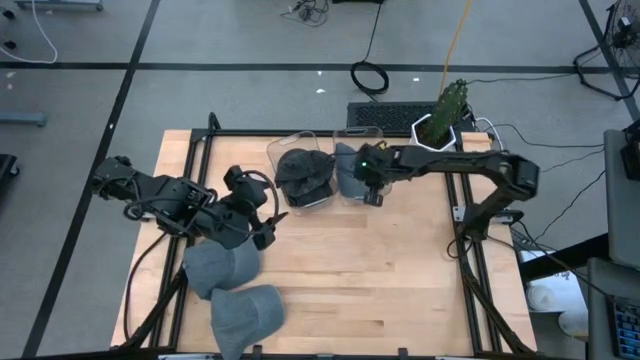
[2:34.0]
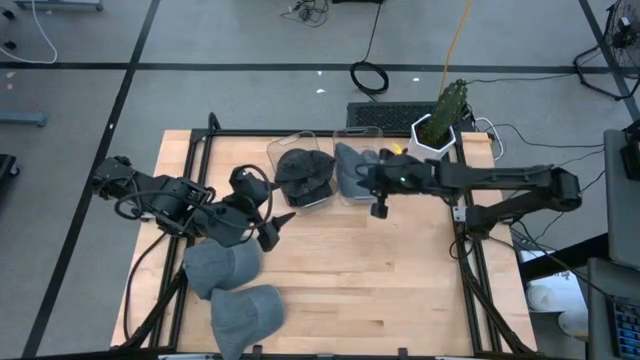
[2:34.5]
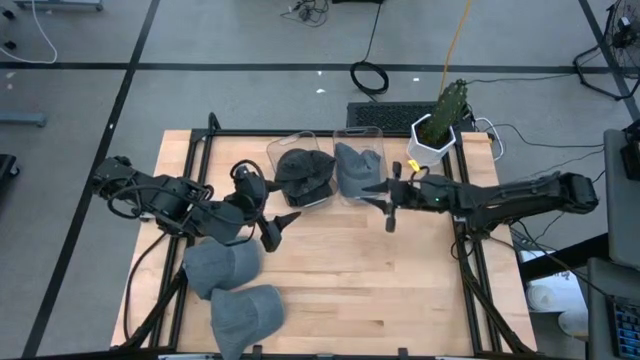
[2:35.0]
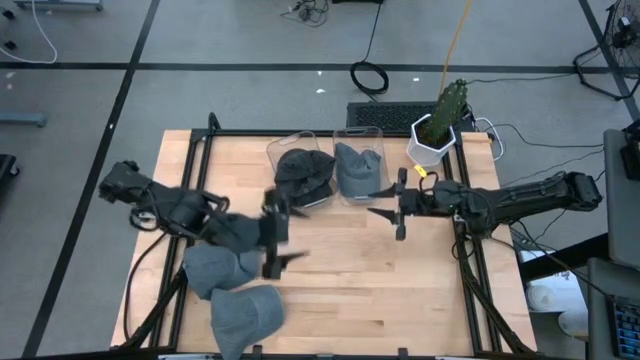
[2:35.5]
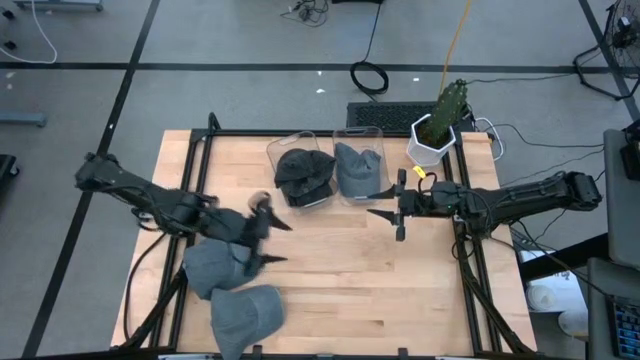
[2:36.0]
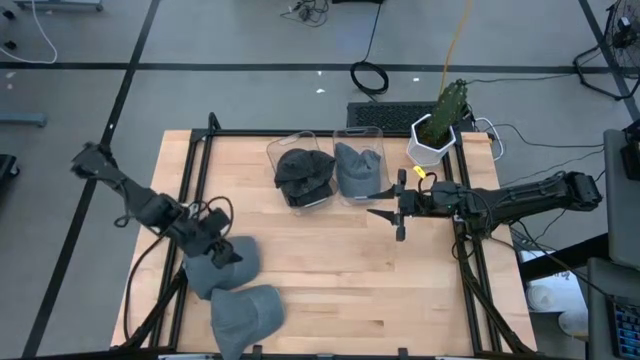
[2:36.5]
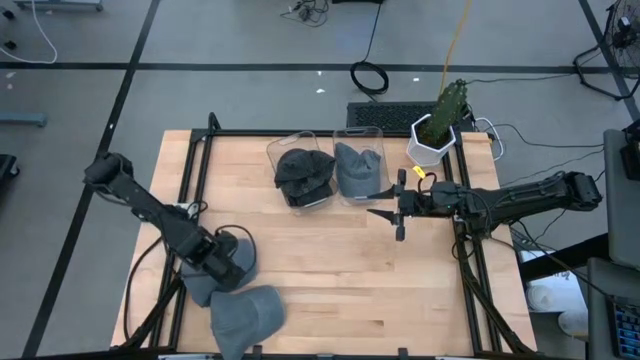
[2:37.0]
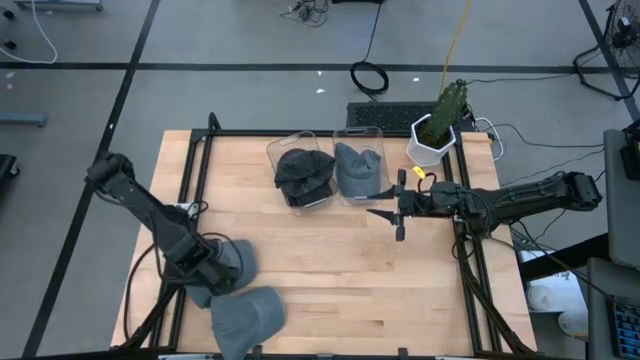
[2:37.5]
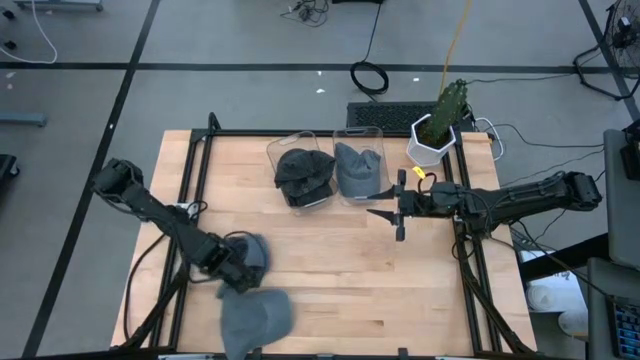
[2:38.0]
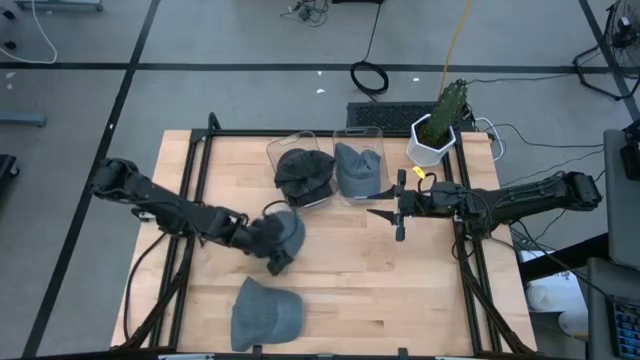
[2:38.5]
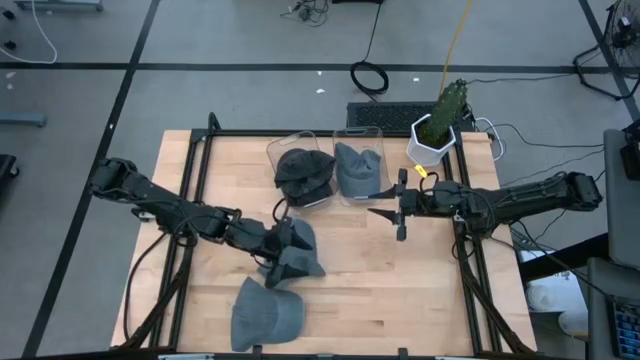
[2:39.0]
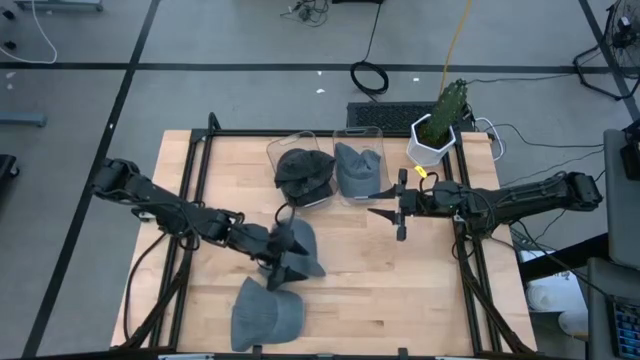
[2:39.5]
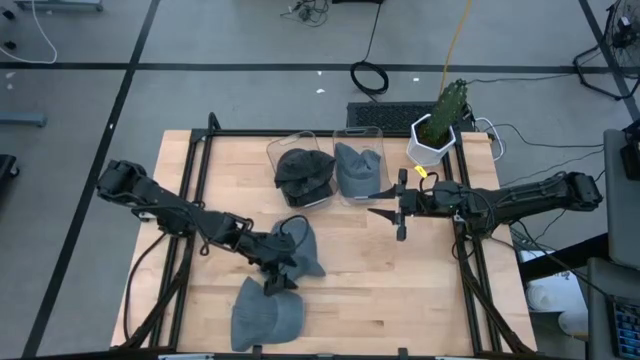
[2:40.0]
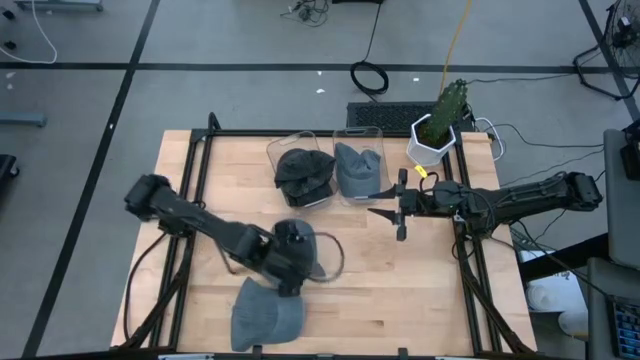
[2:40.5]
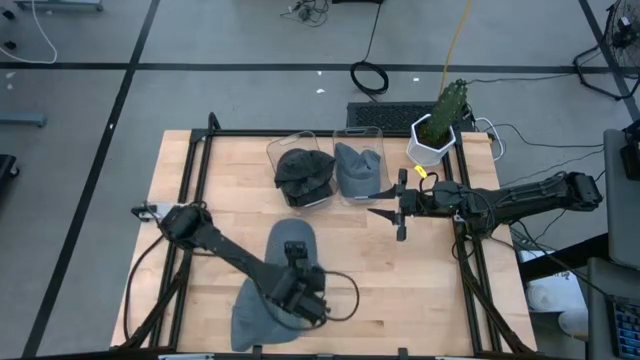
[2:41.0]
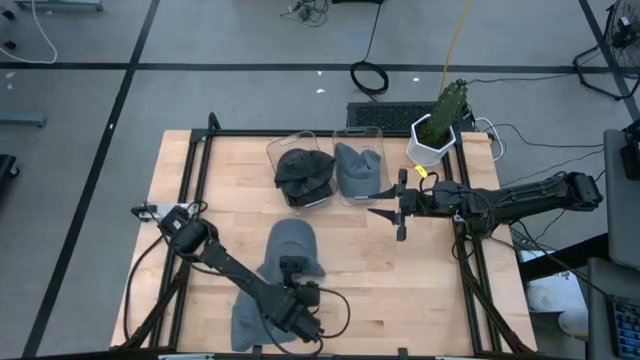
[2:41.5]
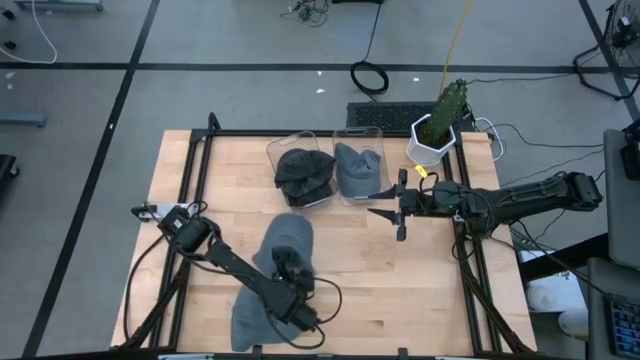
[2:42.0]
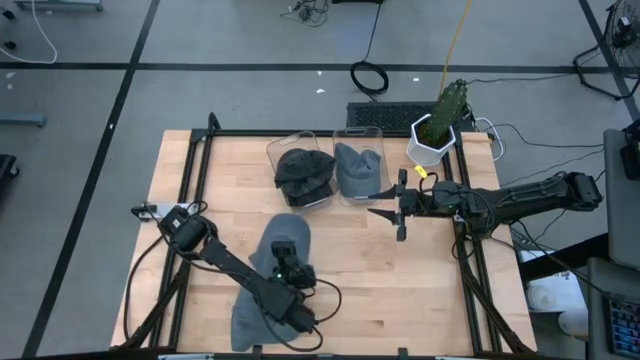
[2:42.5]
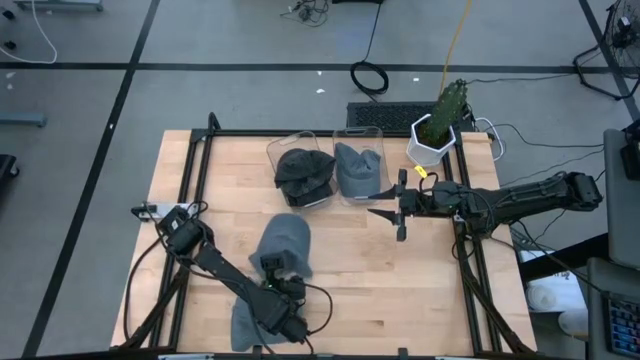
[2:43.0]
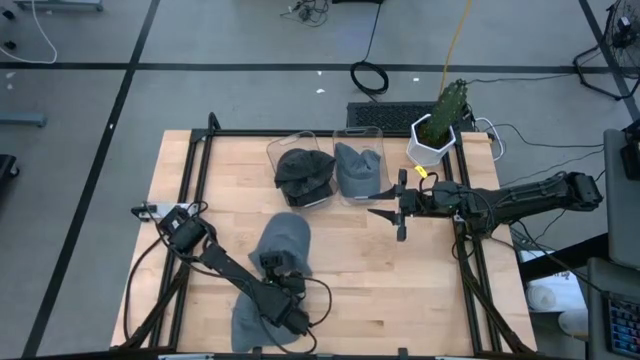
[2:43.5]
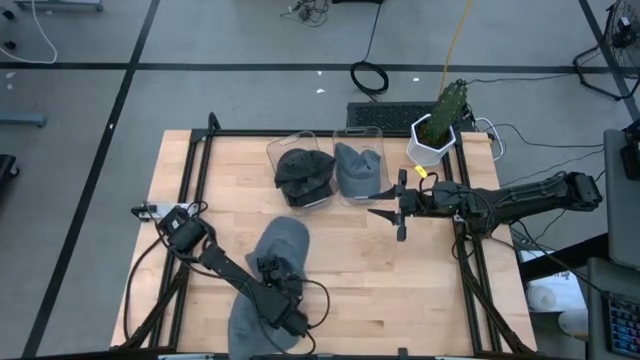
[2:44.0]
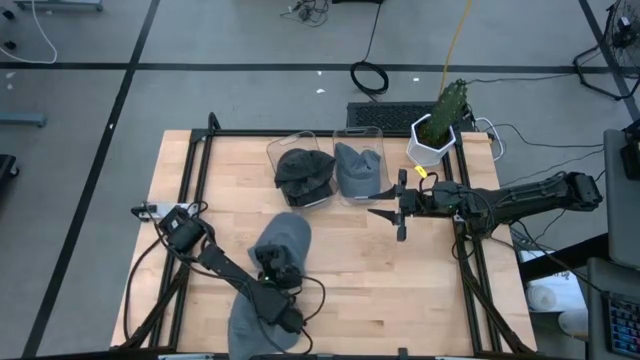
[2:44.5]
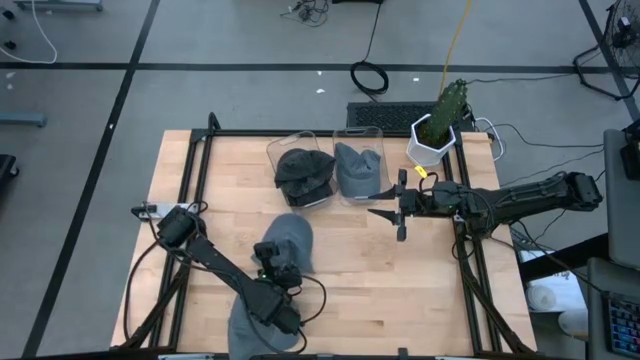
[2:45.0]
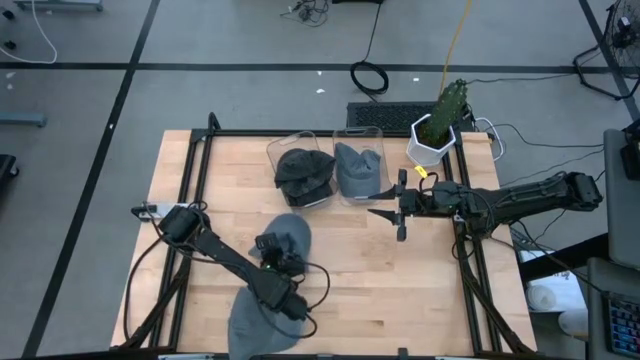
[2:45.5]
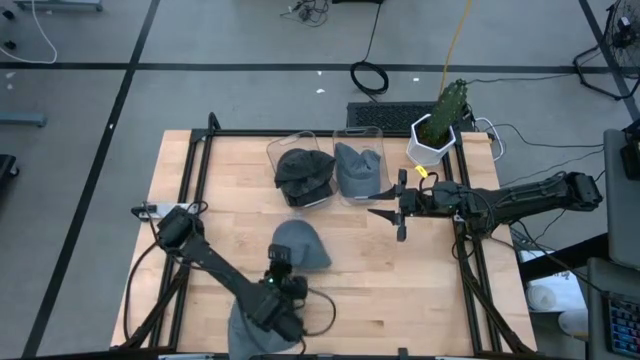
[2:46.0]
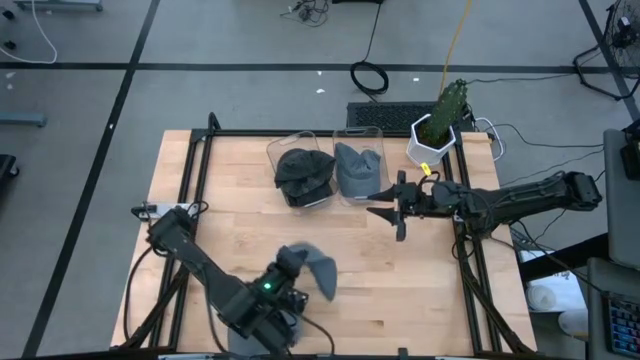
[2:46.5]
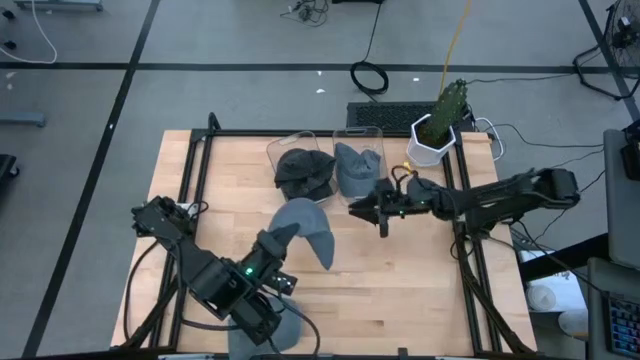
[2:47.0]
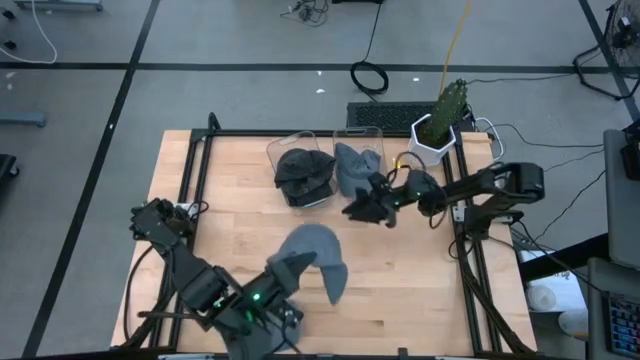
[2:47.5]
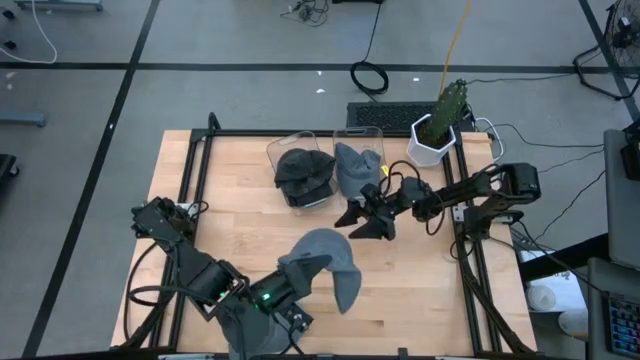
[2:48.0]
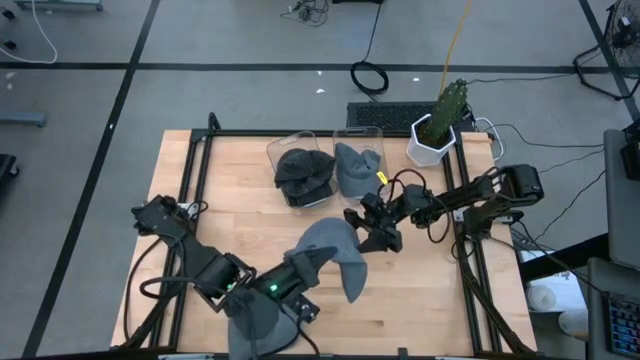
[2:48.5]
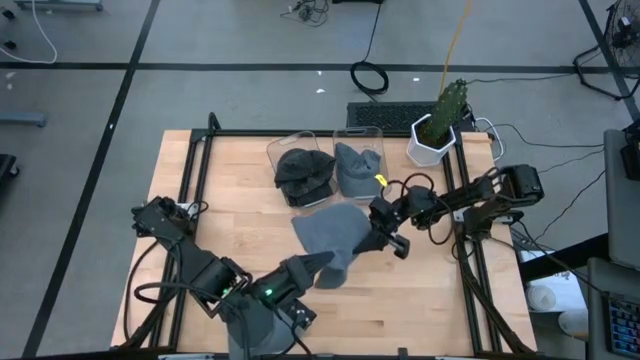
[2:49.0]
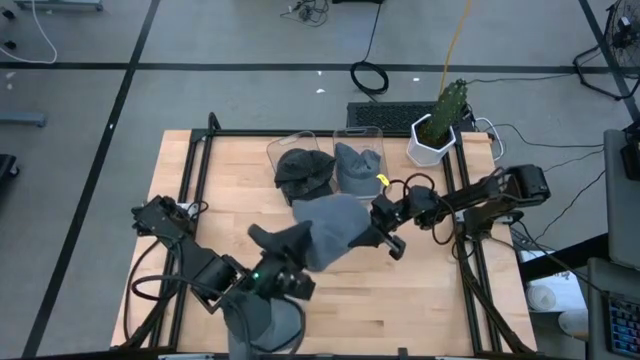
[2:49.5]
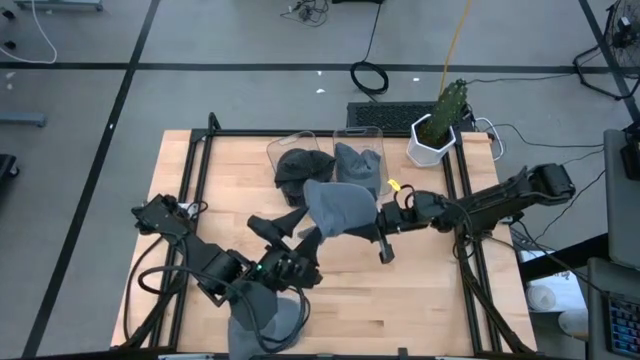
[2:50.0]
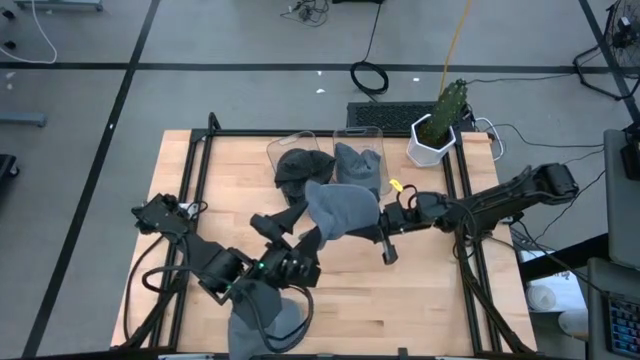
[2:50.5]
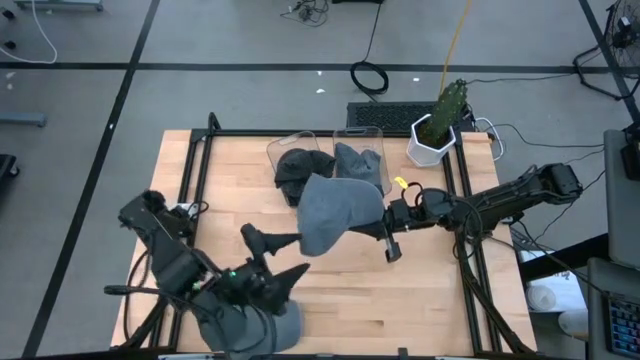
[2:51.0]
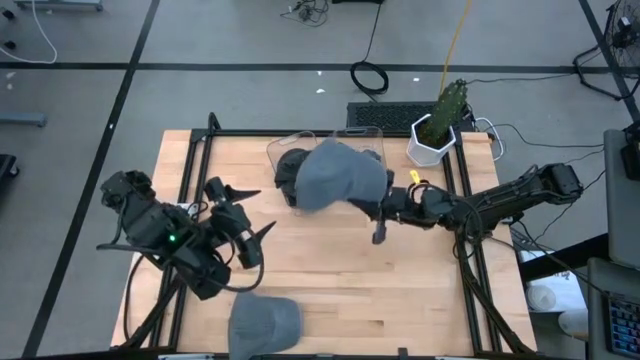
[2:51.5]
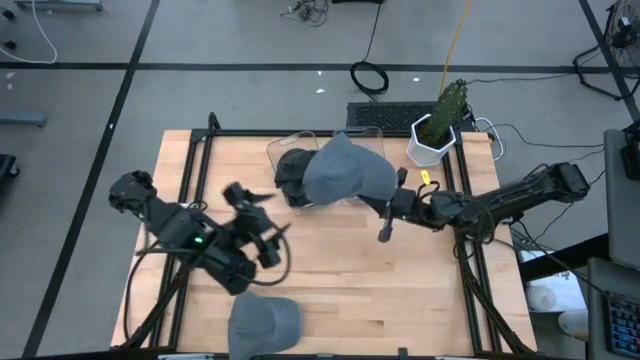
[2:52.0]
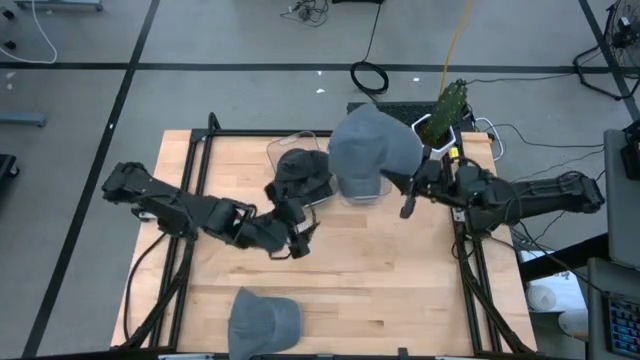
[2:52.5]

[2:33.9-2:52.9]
Task: Pick & Place hat
Put the top gray cap into the right transparent bin

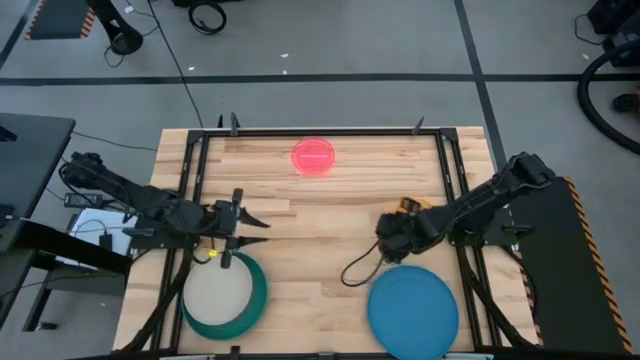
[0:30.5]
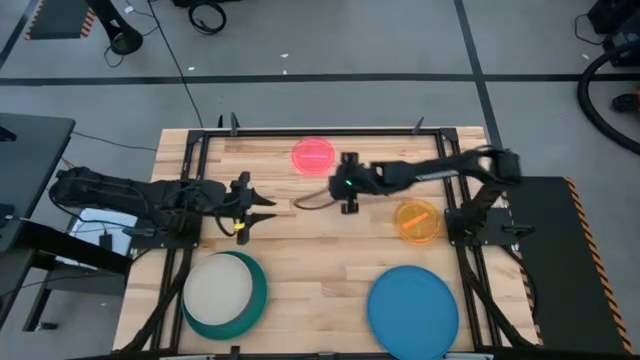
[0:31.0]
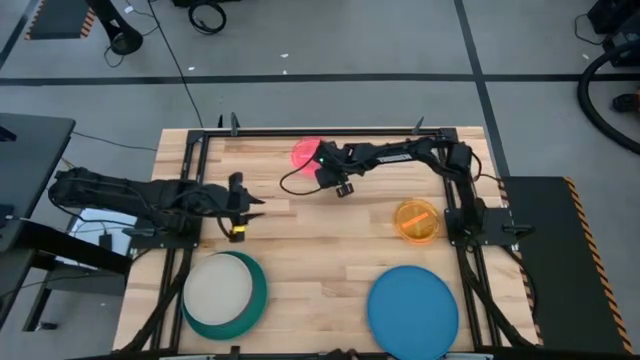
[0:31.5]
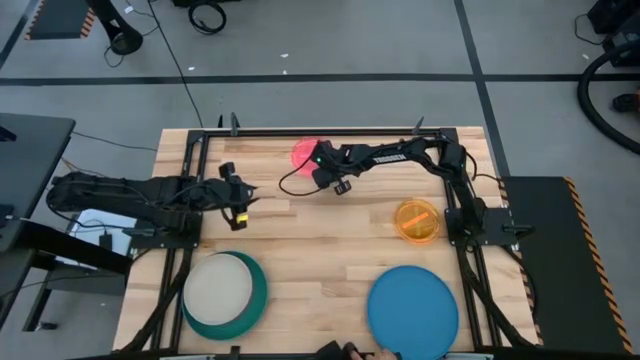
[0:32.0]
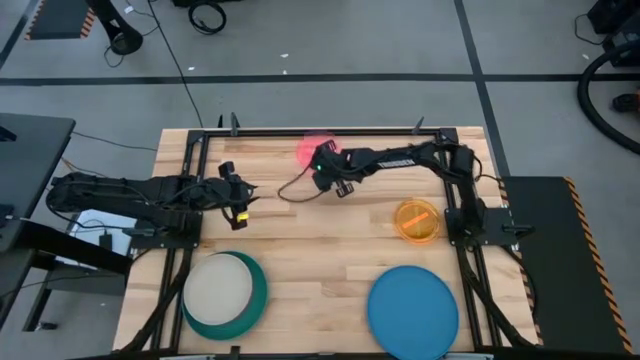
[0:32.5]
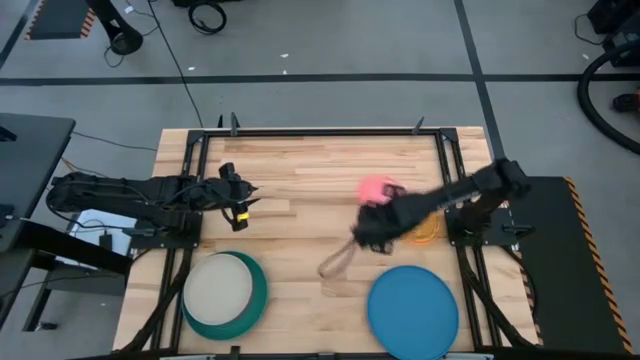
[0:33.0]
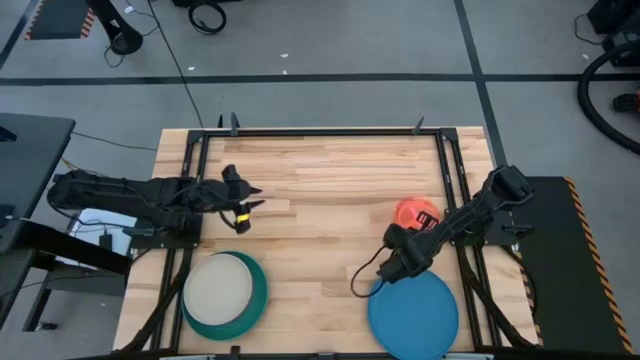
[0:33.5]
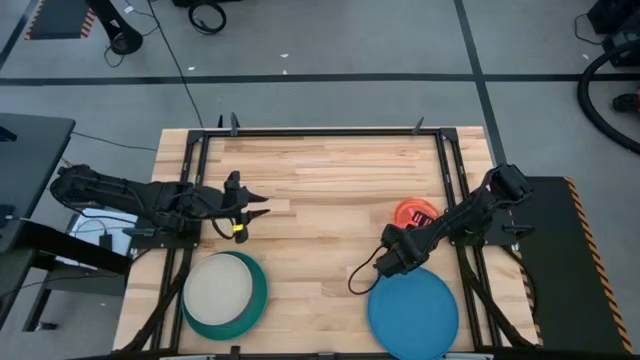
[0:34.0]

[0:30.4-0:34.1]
Task: Stack plastic plates
Stack the pink transparent plate on top of the orange transparent plate
